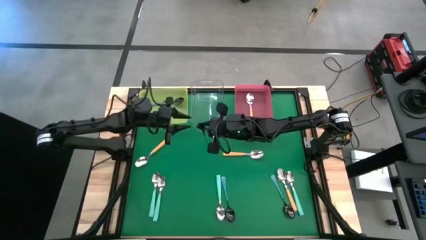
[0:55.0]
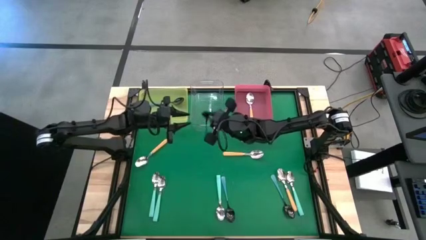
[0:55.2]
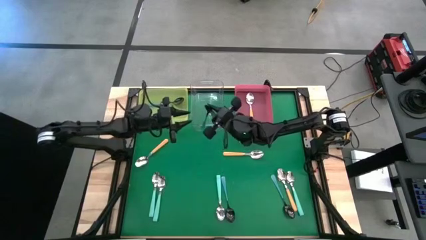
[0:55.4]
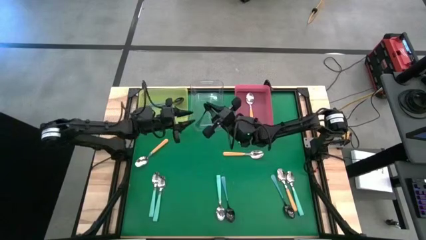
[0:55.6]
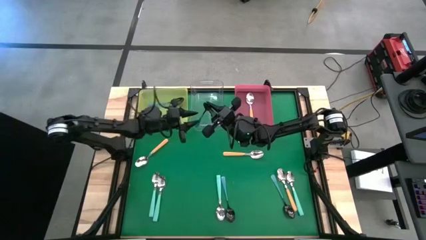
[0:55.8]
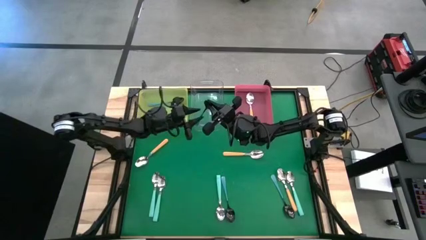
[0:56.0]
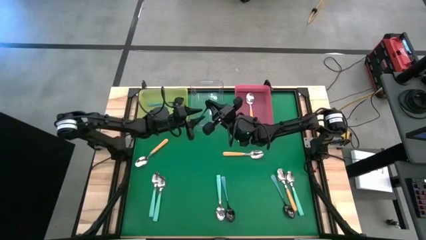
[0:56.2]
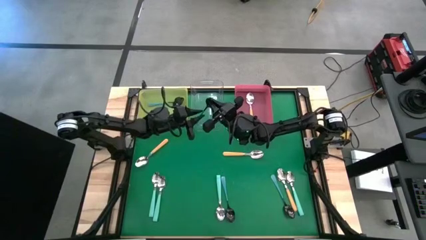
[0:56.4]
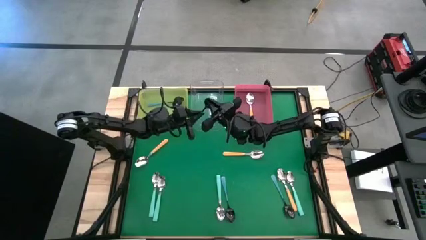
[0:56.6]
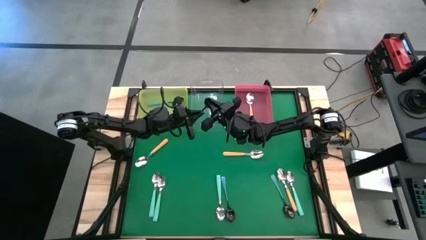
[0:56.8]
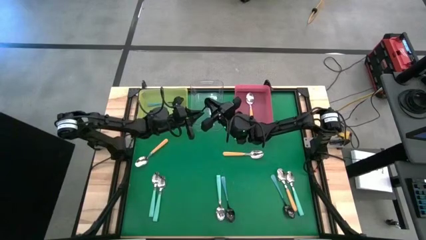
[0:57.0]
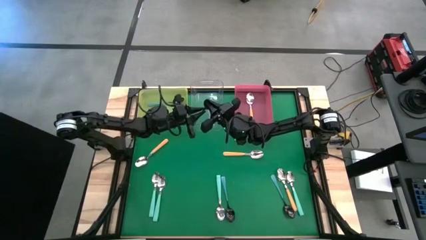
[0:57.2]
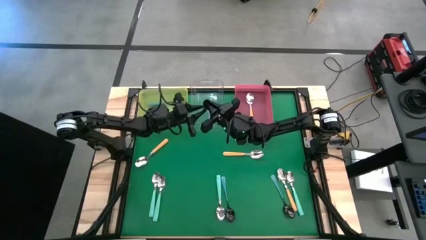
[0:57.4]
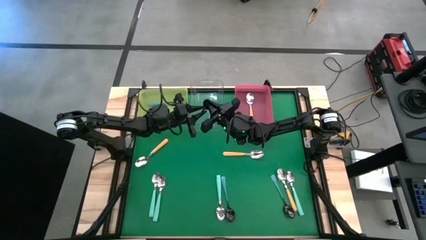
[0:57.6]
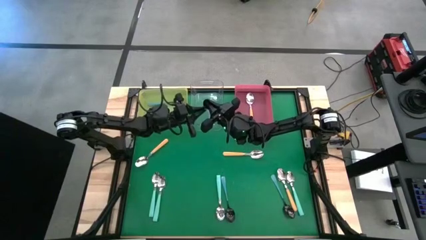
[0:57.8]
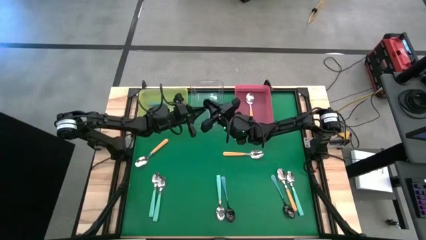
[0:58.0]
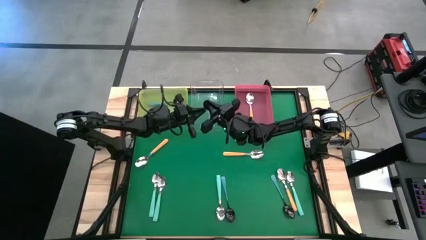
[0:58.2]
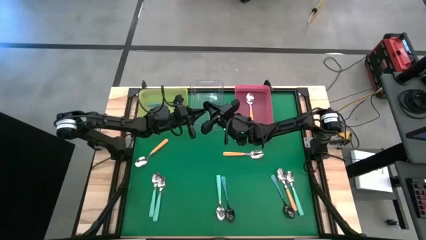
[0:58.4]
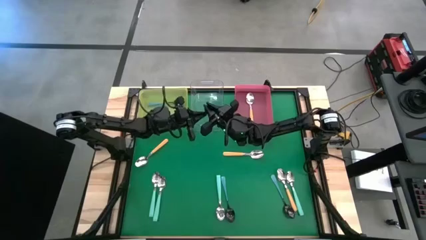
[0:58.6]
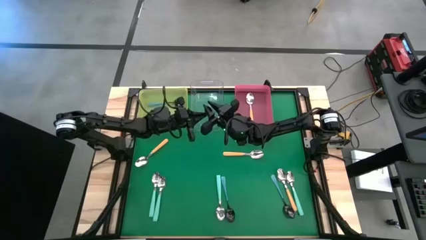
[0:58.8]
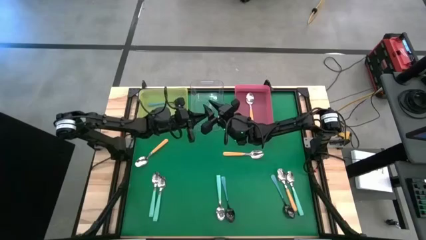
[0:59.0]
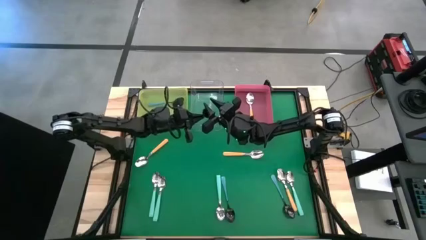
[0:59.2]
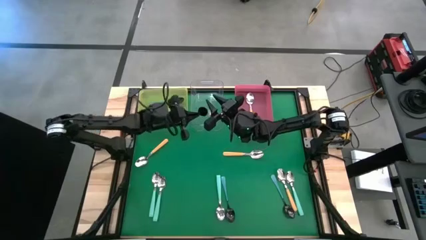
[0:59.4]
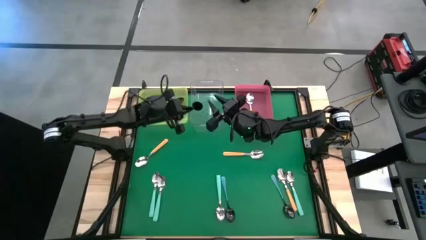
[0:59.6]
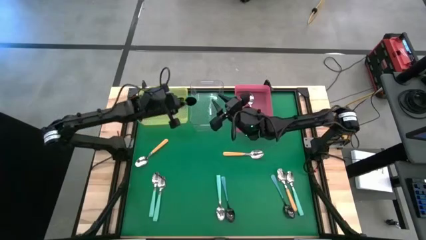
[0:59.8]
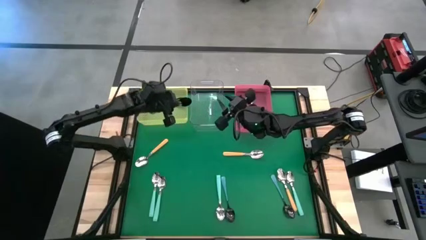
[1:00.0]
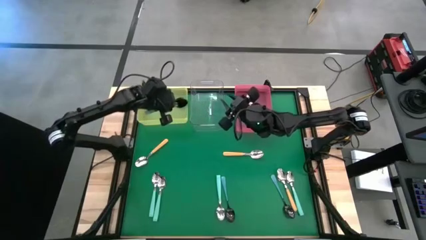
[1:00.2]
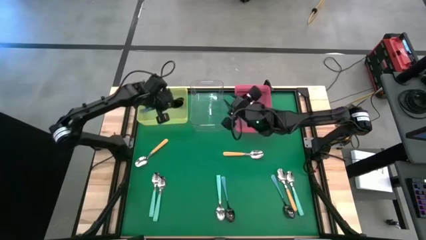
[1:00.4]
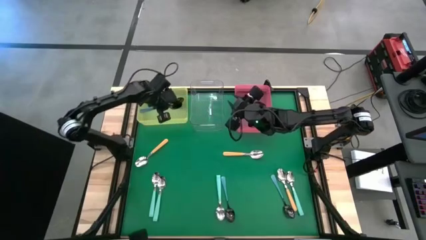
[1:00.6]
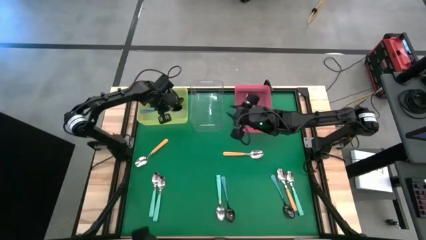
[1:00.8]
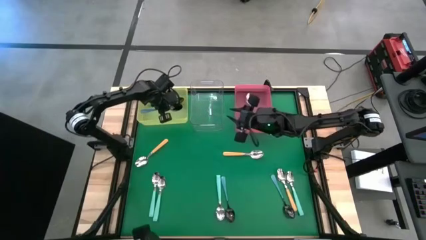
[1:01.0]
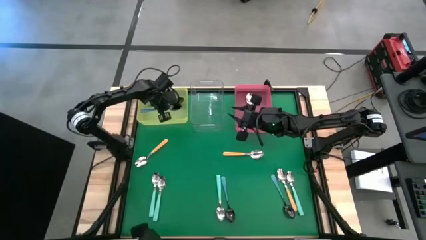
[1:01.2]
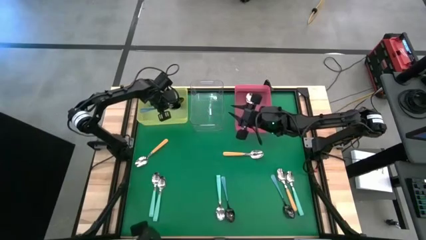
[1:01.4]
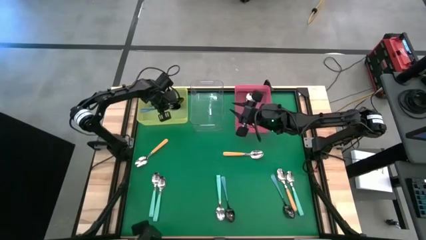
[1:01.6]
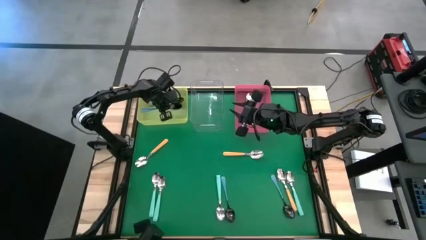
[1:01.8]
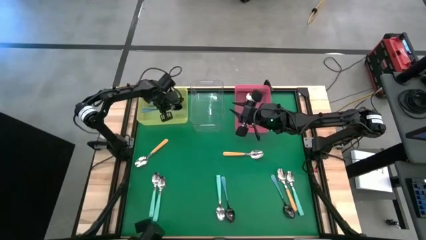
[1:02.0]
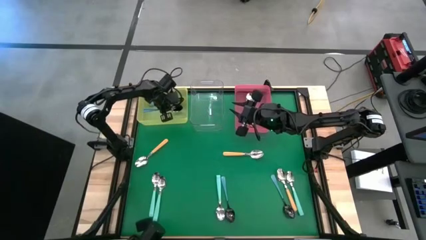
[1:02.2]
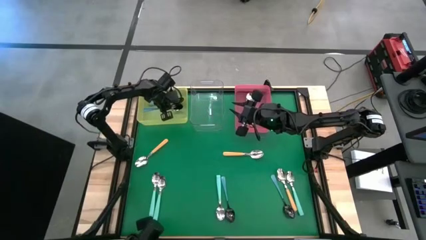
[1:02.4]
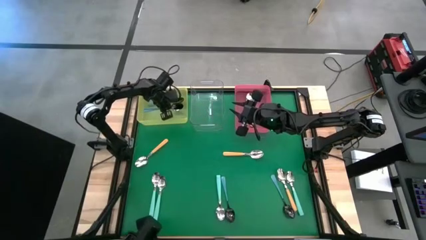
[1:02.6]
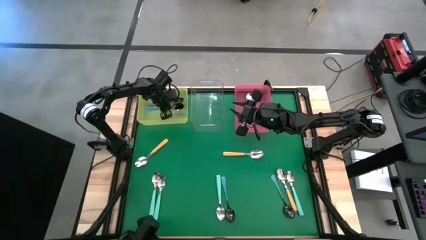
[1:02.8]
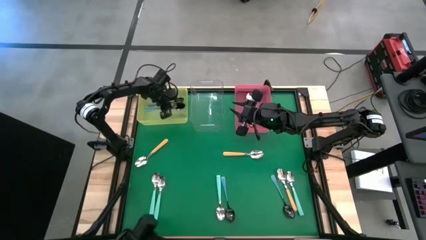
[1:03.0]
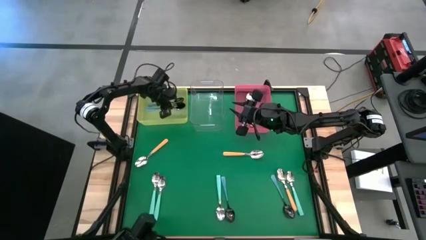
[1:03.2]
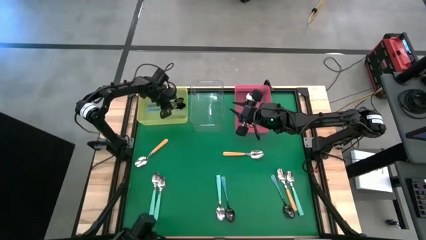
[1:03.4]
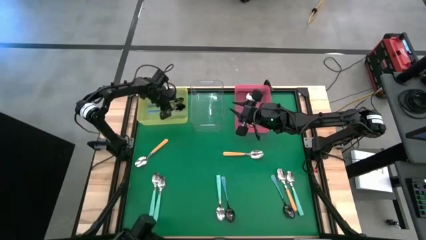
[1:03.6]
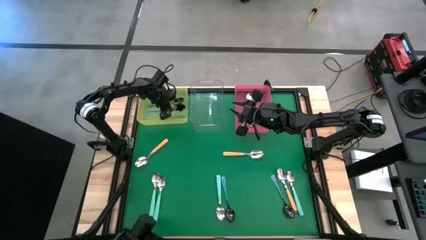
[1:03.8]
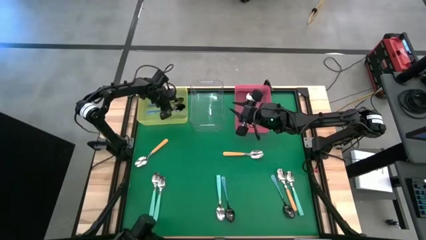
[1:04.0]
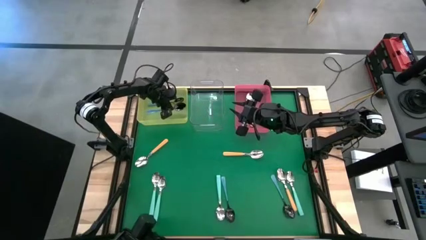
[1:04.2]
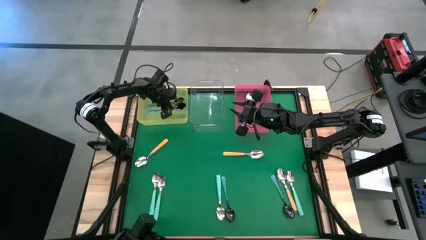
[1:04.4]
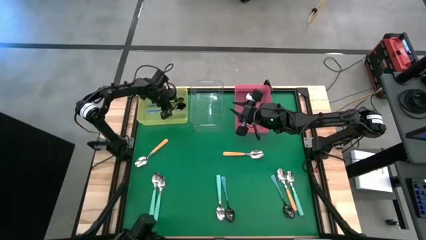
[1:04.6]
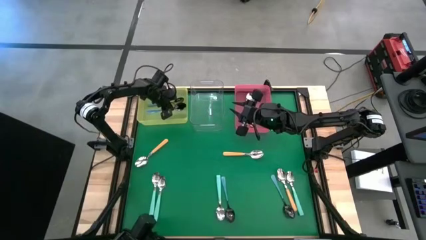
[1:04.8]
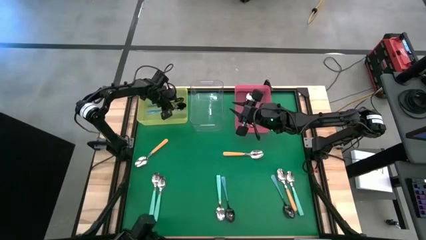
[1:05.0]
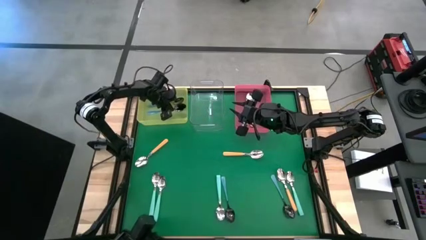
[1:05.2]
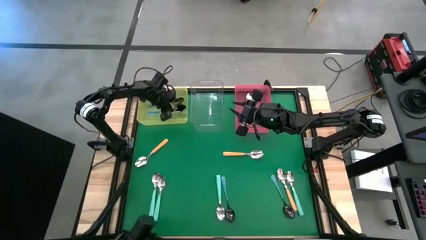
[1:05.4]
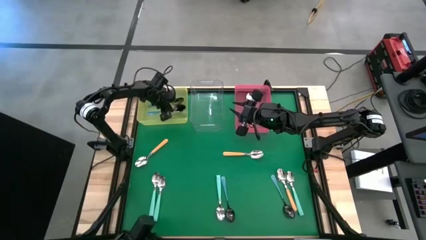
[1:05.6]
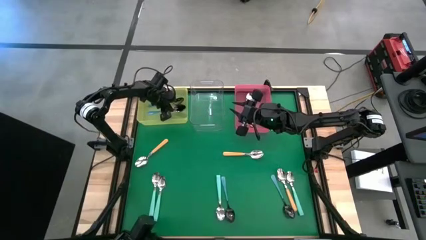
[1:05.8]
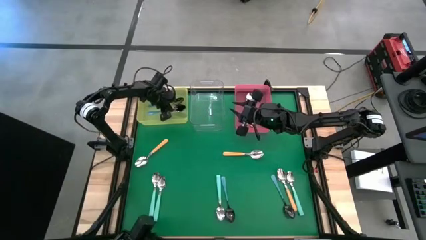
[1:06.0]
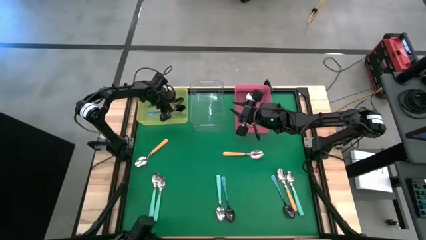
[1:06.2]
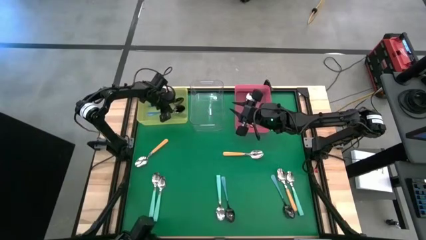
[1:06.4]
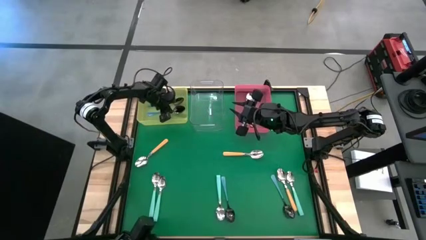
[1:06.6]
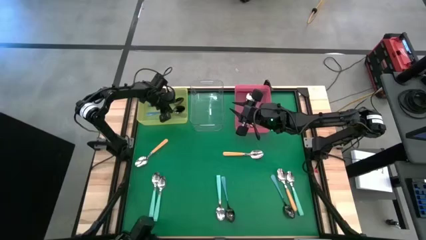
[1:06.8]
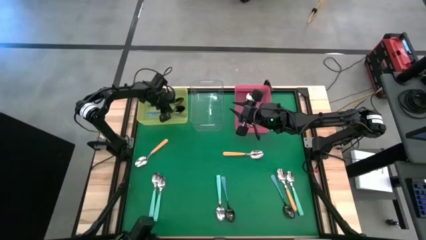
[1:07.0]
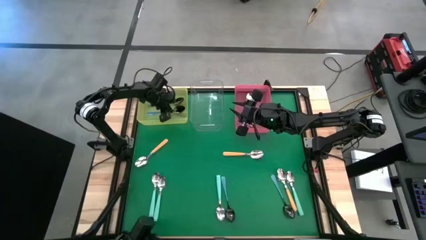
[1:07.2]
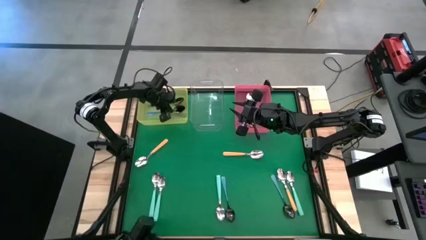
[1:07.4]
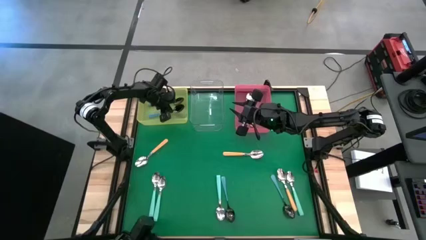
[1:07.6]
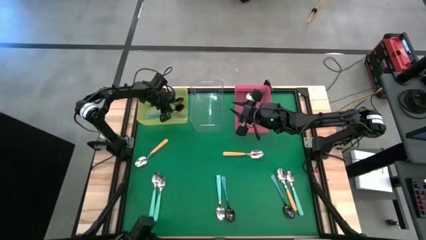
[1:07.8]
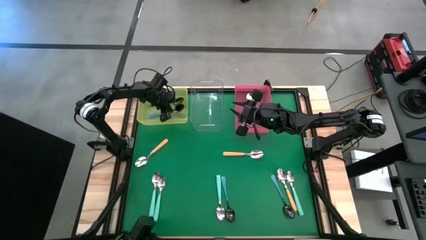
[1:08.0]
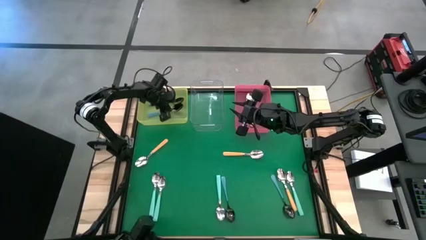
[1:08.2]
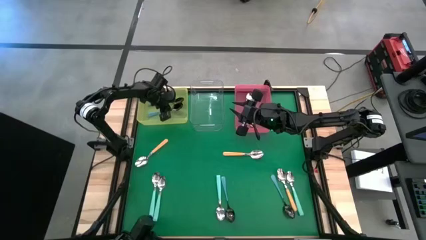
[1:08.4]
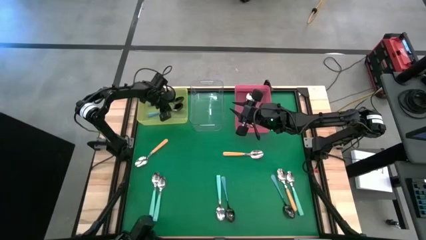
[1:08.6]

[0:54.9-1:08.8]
Task: Sort silverware by color (type)
Put the blue spoon into the yellow bin
